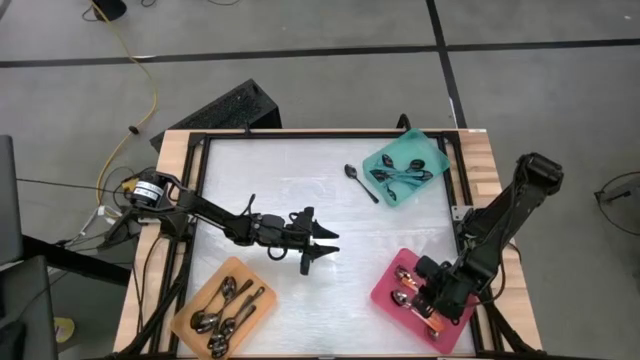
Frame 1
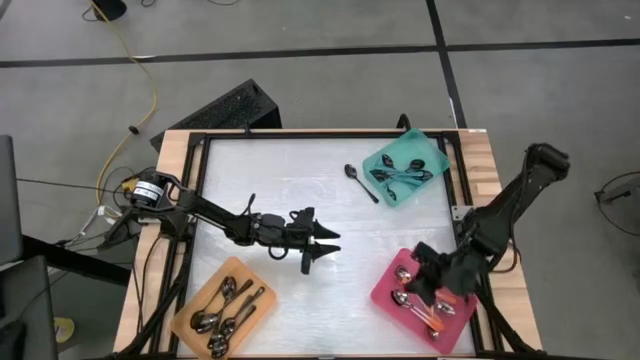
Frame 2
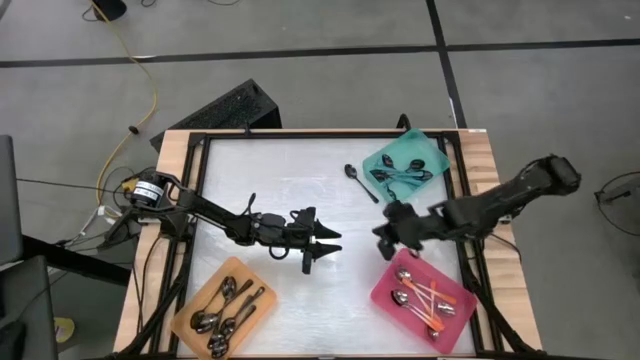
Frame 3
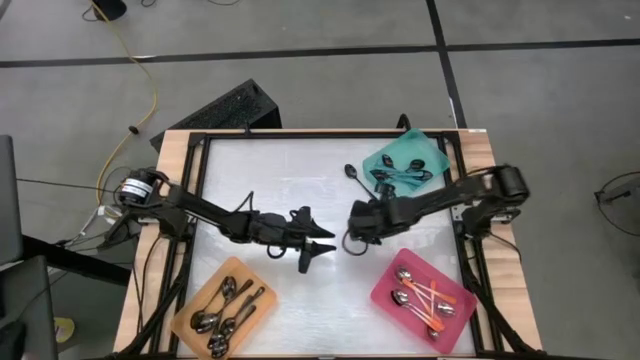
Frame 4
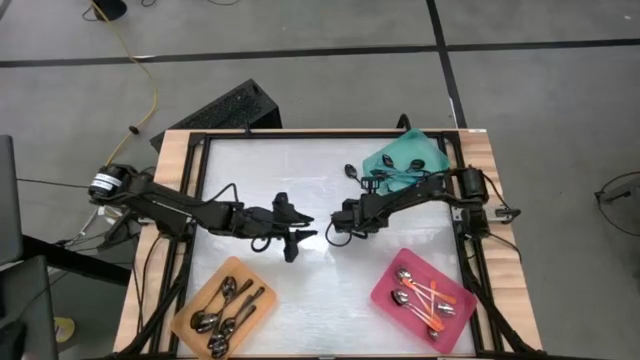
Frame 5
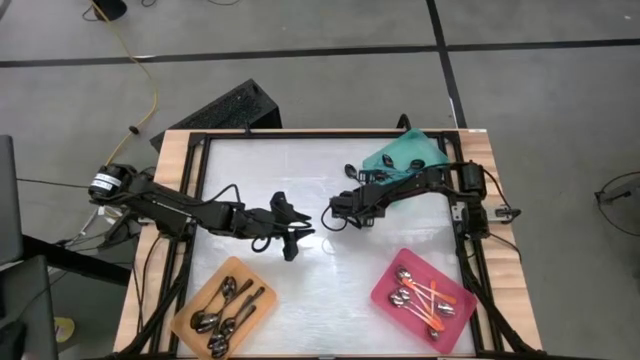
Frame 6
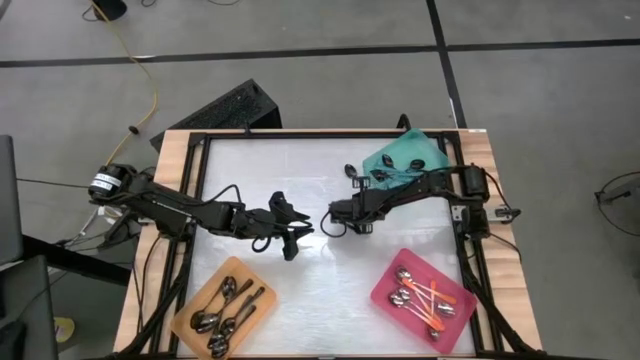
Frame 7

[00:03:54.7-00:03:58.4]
Task: Sort silverware by color (type)
Put the black spoon into the orange bin

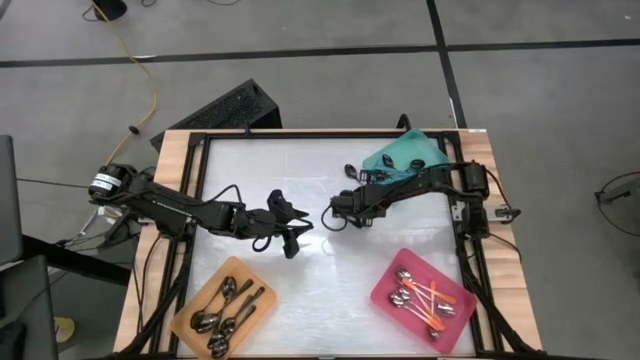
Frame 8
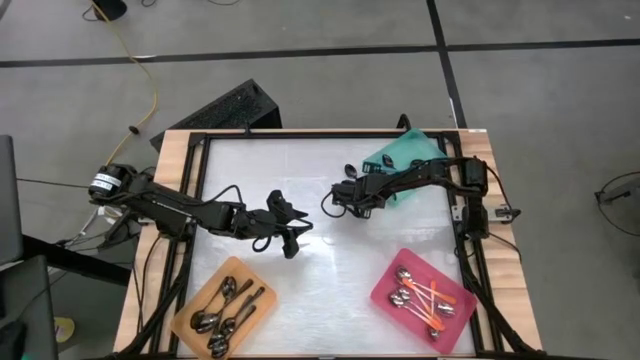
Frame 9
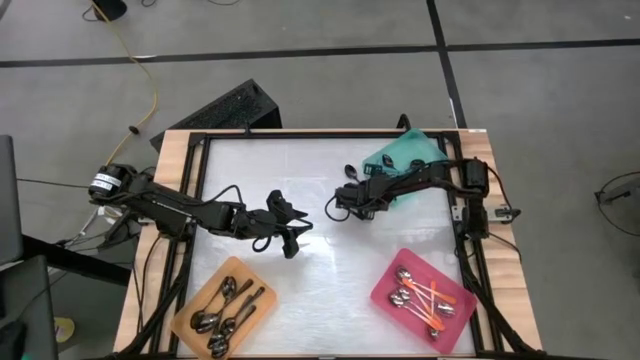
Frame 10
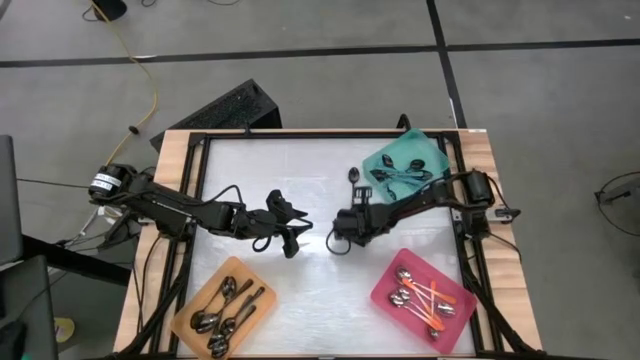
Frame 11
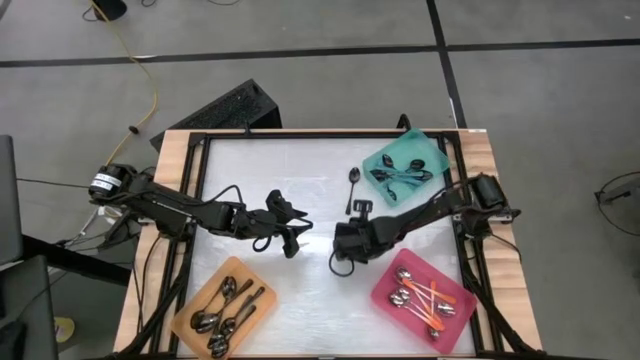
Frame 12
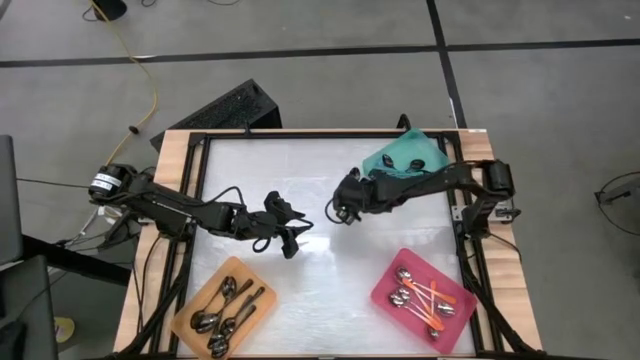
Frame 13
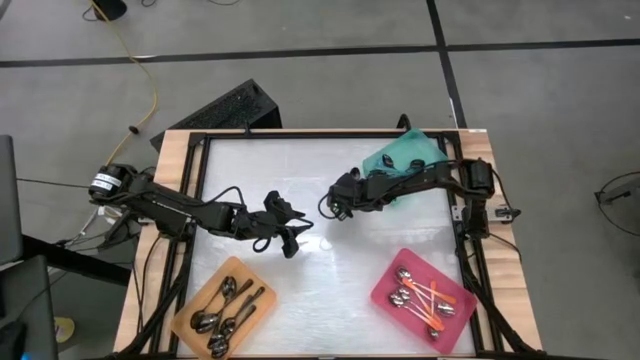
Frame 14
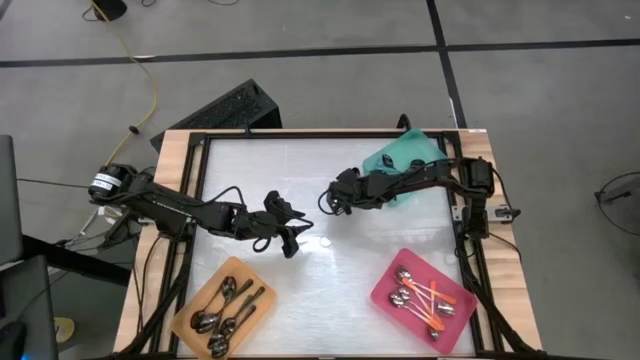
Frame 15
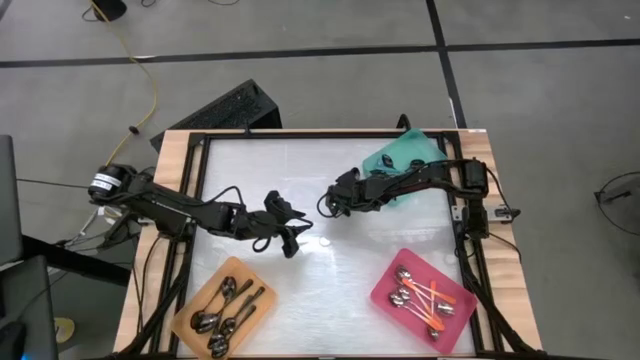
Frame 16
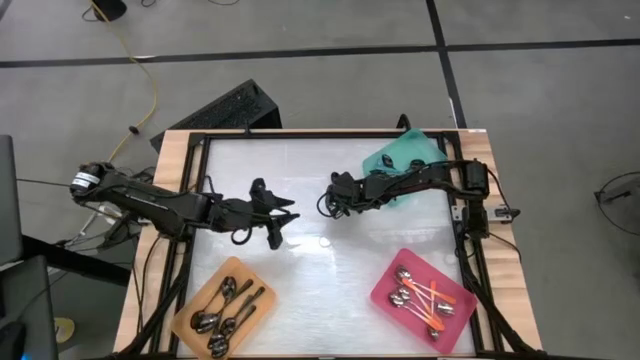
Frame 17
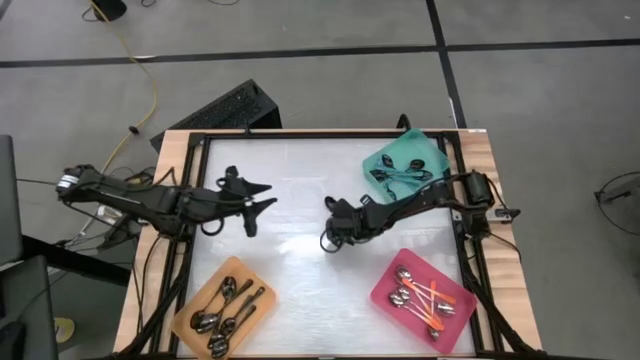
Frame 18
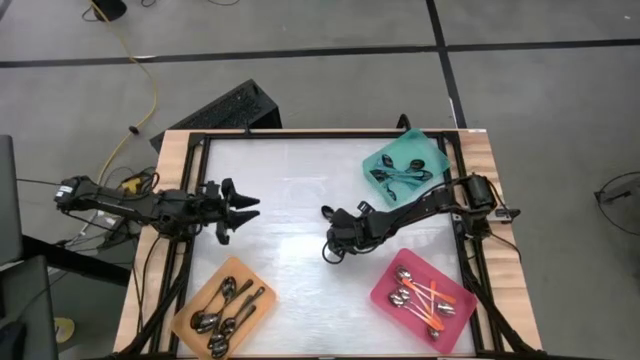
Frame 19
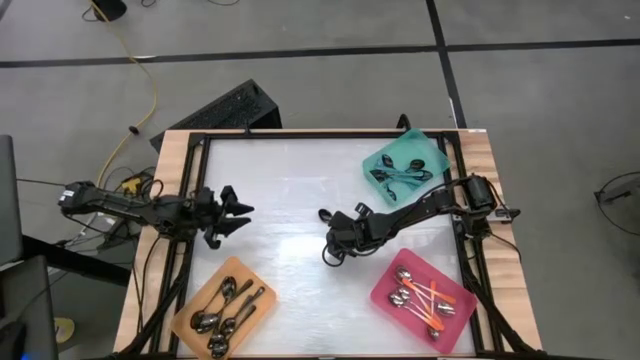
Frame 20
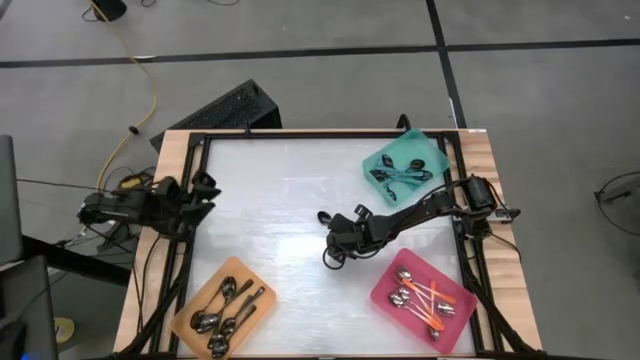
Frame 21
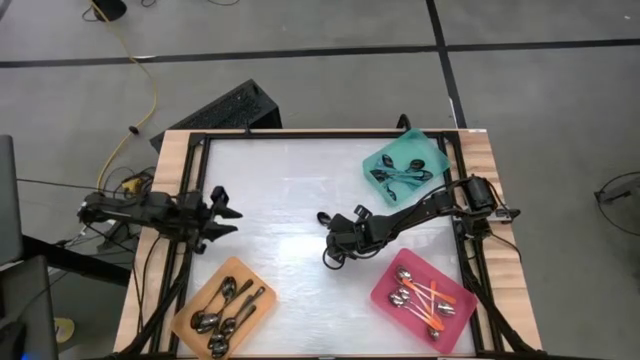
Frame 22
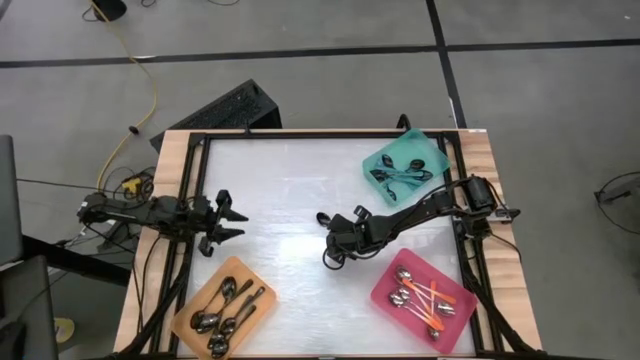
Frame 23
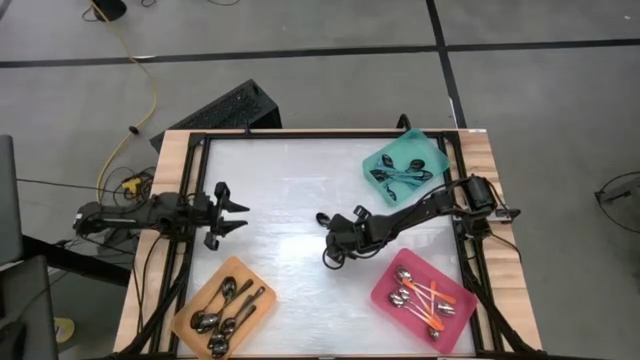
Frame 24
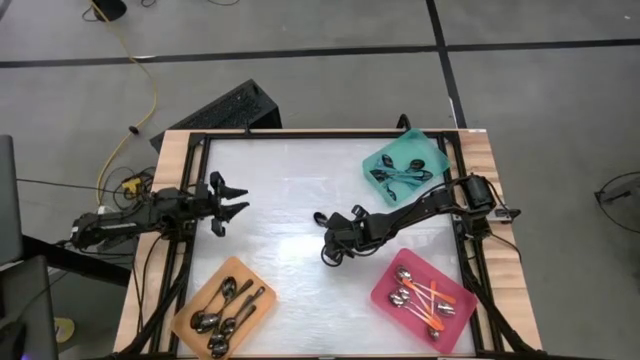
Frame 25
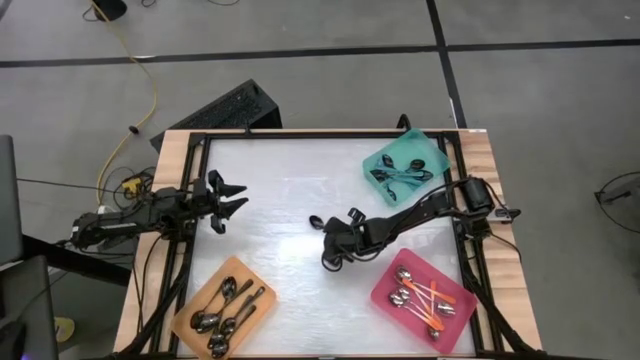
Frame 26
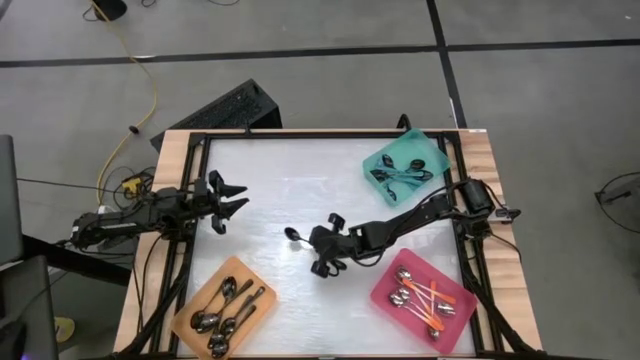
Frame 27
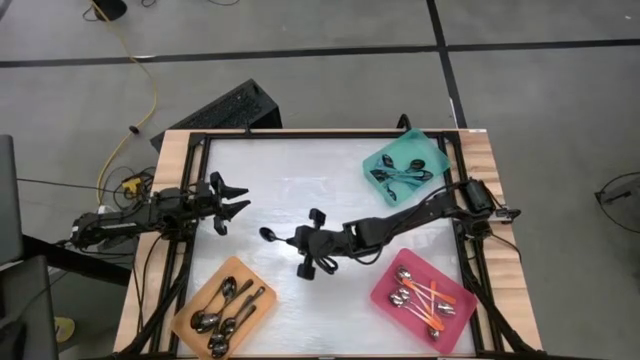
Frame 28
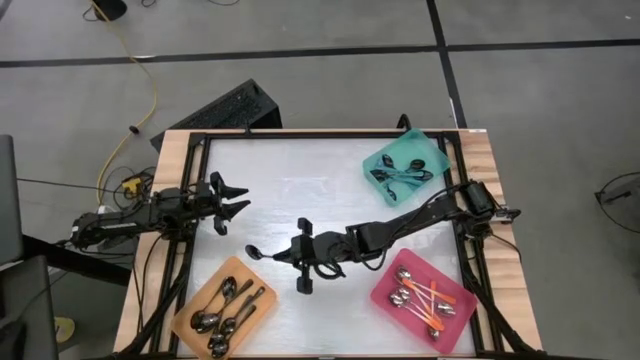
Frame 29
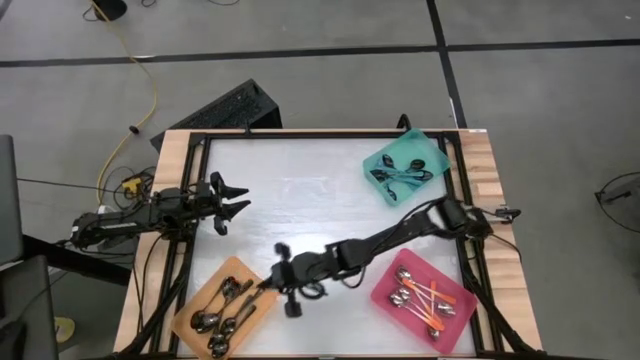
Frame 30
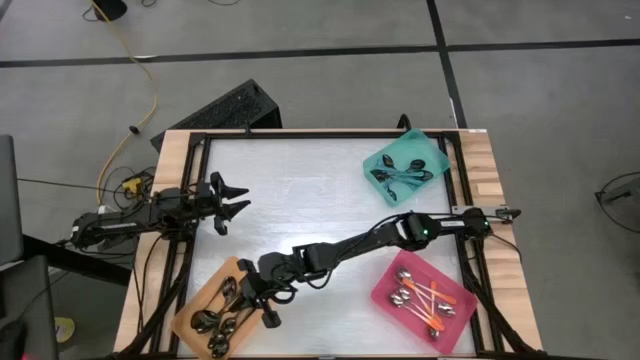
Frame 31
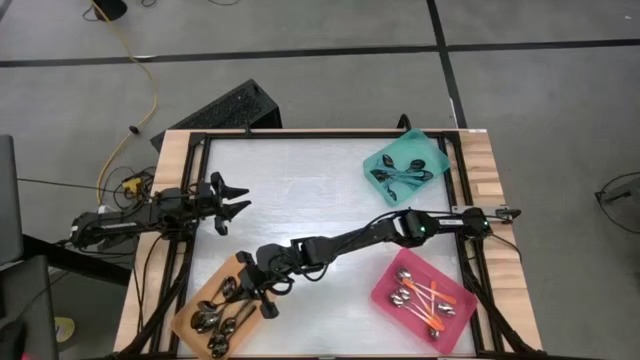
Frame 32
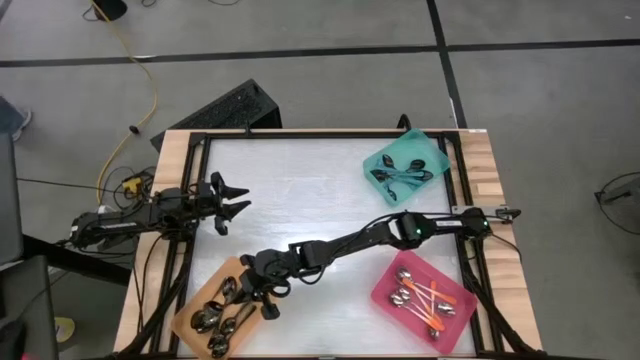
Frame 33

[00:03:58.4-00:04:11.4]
Put the black spoon into the orange bin

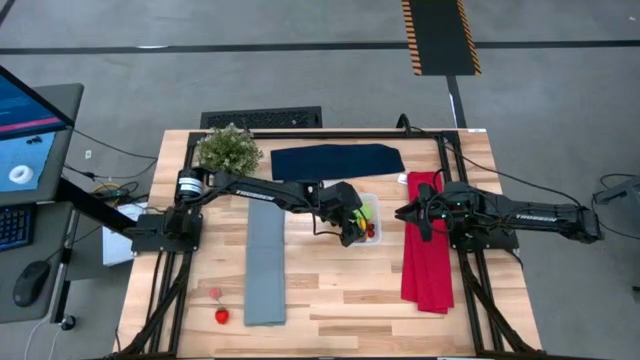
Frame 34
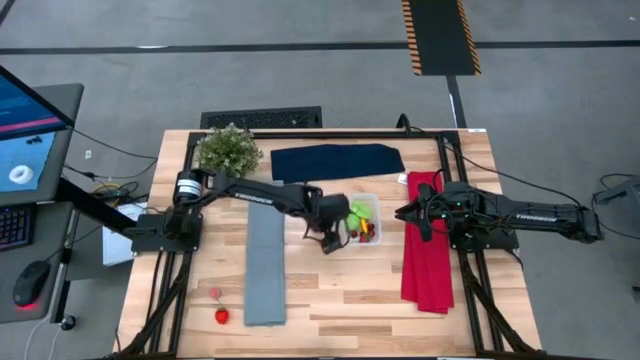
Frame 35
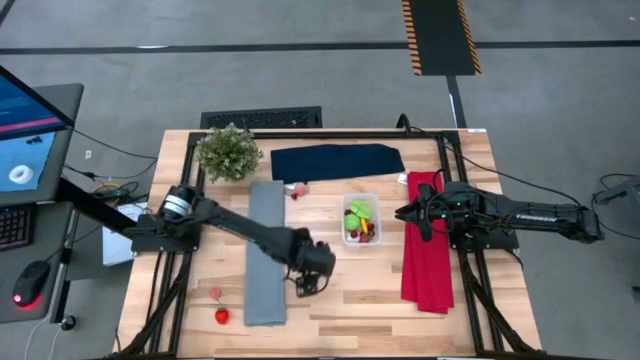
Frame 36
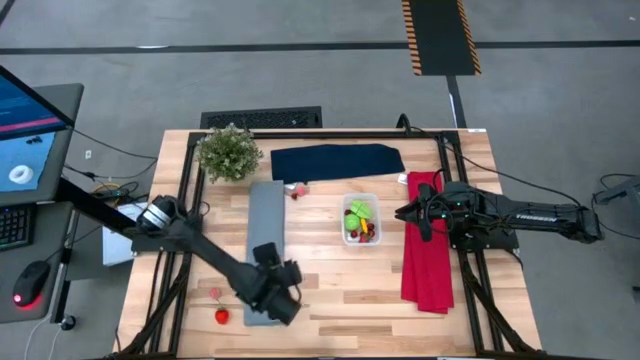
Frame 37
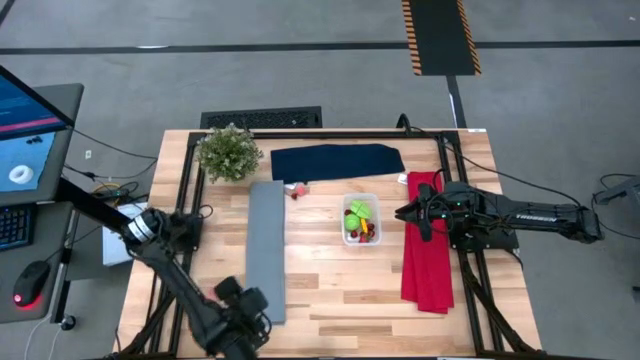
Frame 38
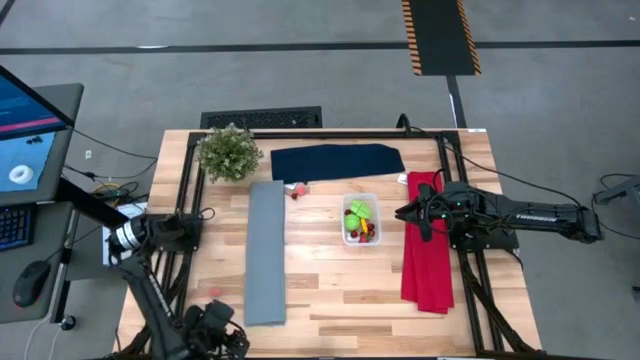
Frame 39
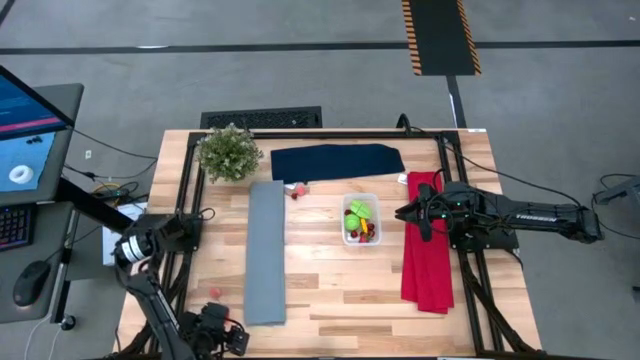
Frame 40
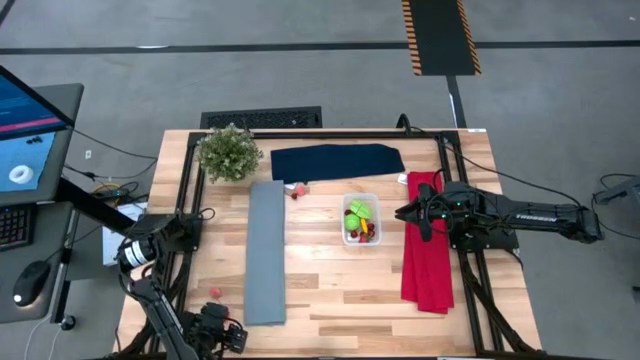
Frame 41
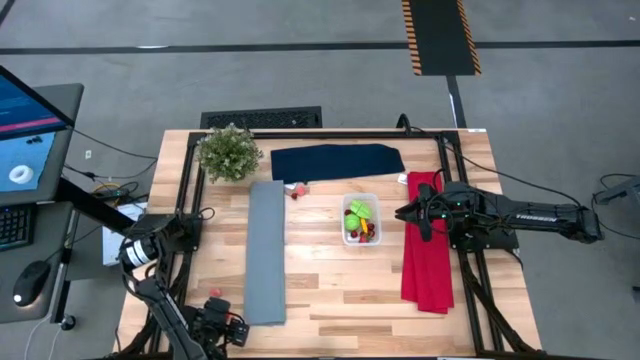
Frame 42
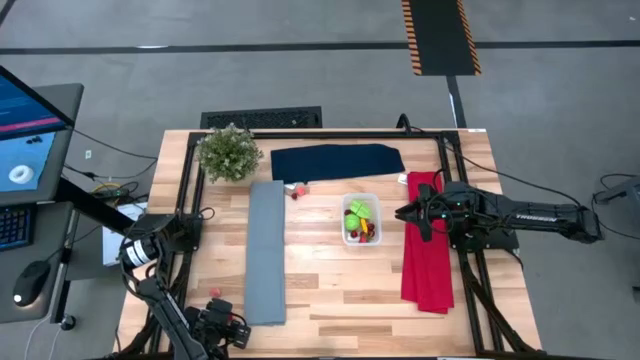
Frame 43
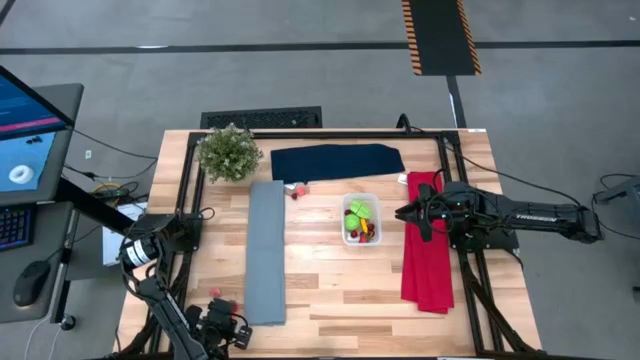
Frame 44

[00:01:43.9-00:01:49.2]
Task: Pick and placing Produce into tupperware
Put the red strawberry into the transparent bin
